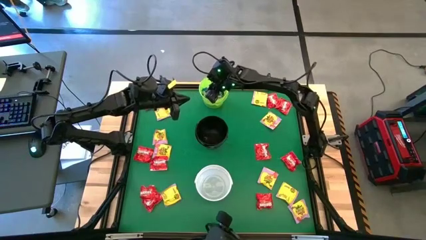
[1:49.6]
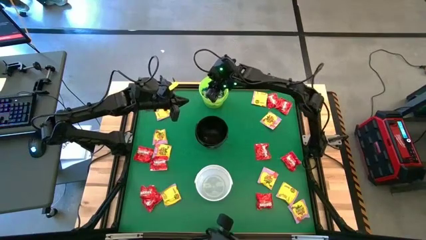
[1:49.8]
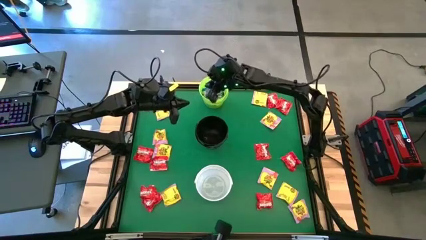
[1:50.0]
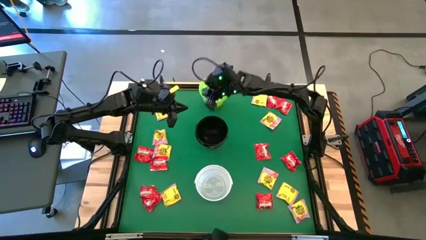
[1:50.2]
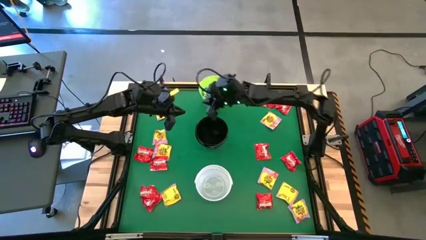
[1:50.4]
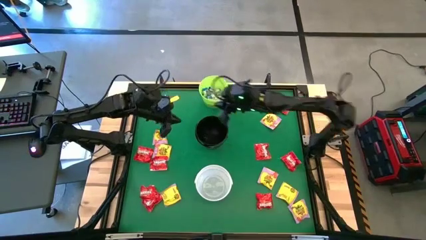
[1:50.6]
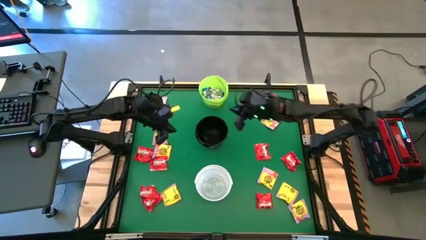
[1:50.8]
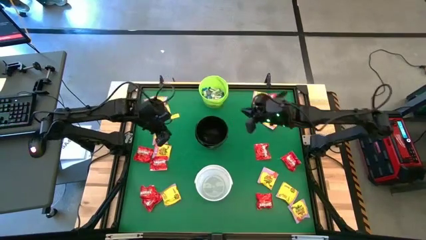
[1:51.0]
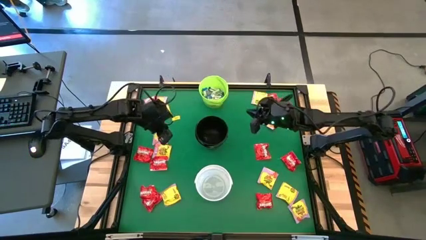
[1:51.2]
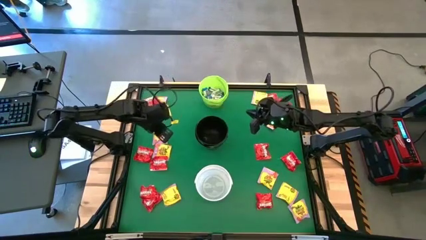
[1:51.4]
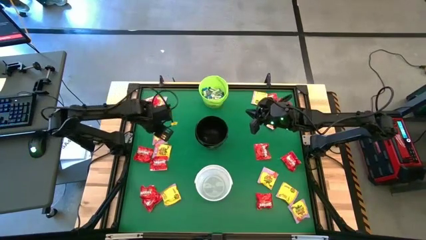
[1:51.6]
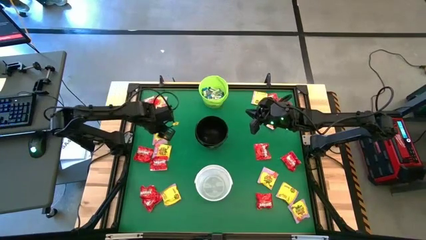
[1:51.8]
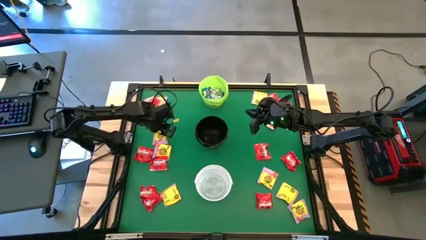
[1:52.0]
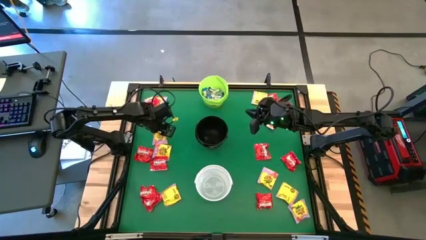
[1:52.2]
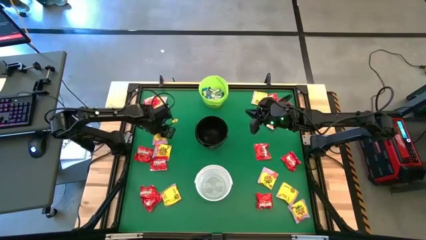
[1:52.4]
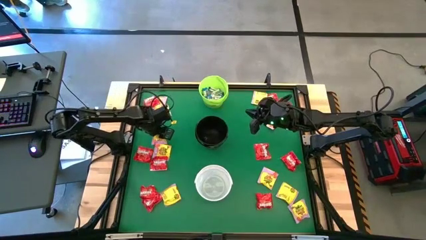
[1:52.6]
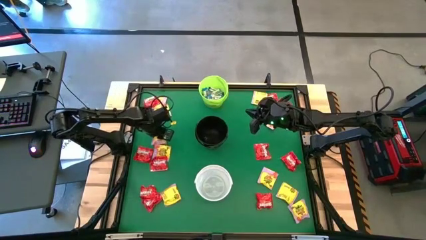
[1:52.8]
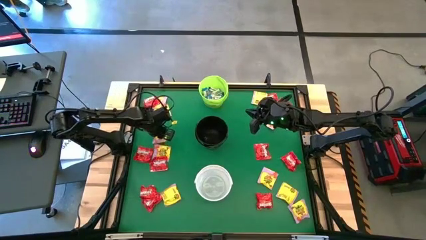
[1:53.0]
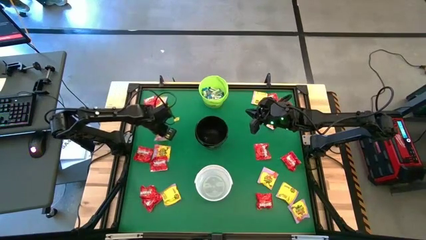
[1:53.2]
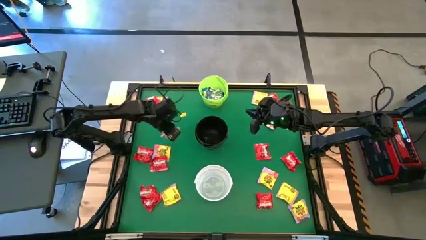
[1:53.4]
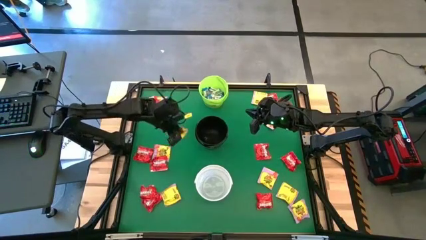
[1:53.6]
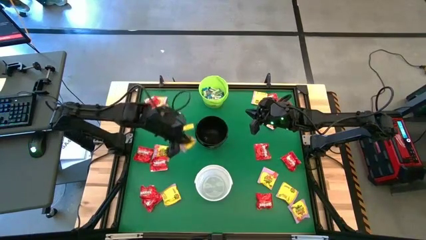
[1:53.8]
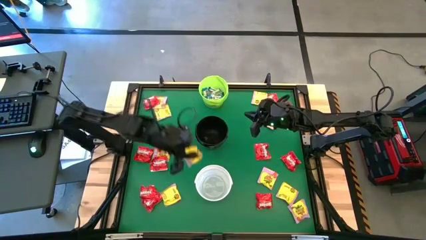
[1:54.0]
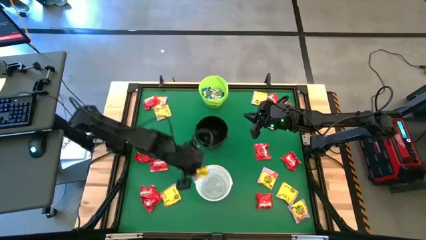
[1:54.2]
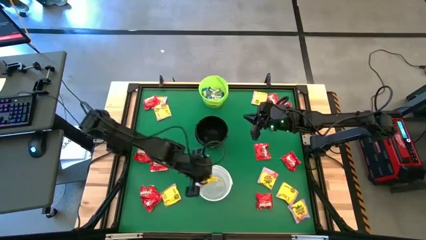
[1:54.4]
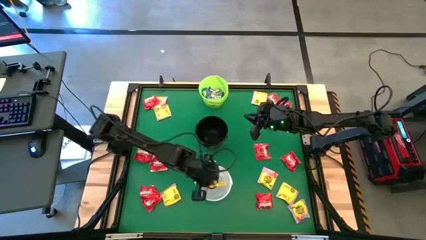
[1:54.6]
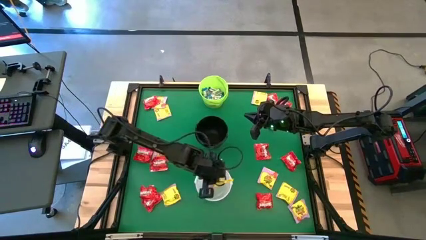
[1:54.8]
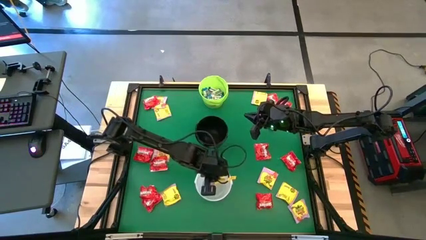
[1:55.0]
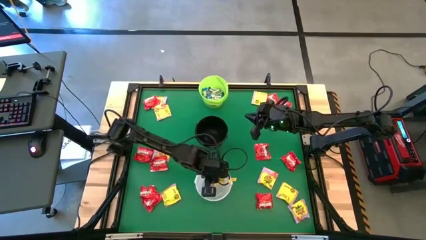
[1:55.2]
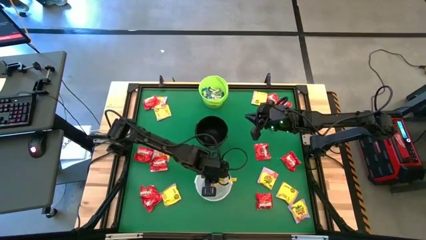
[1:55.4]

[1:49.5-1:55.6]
Task: Sort candy by brand, put in halloween buckets
Put the yellow chocolate into the white bucket

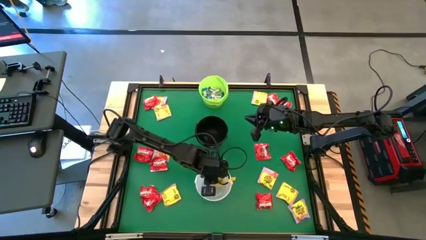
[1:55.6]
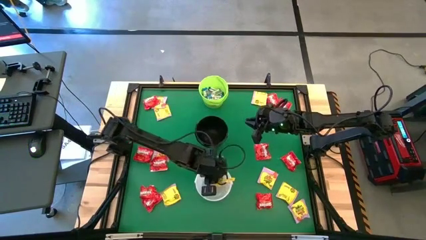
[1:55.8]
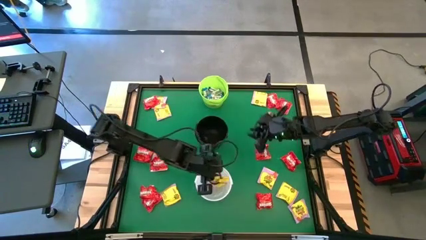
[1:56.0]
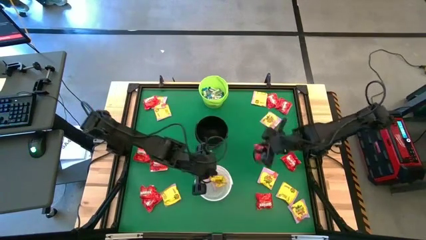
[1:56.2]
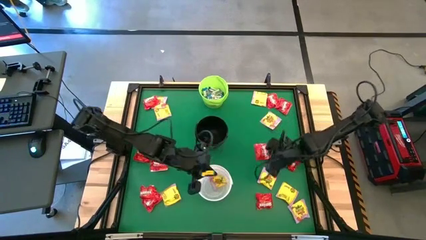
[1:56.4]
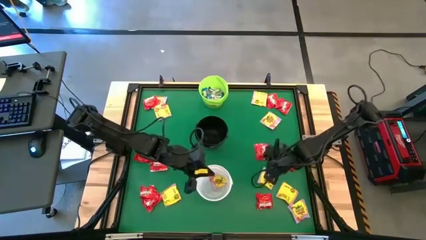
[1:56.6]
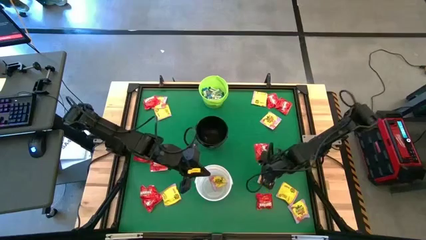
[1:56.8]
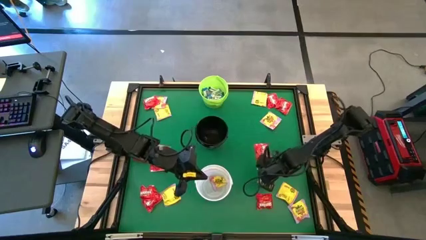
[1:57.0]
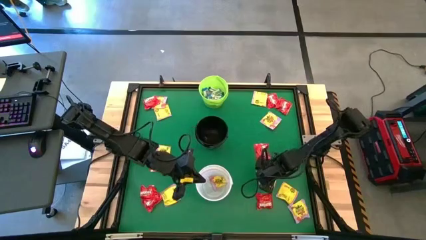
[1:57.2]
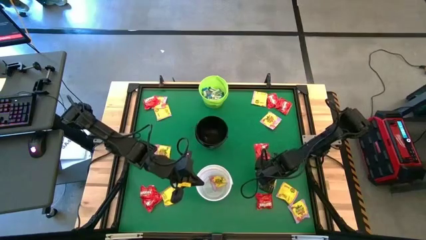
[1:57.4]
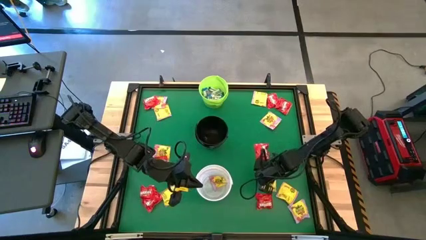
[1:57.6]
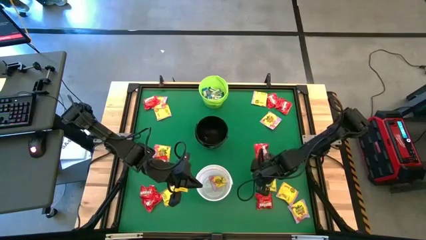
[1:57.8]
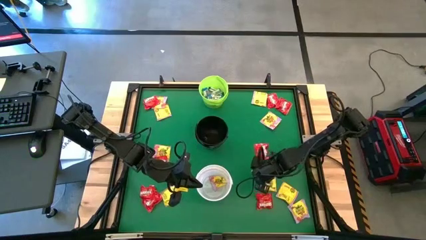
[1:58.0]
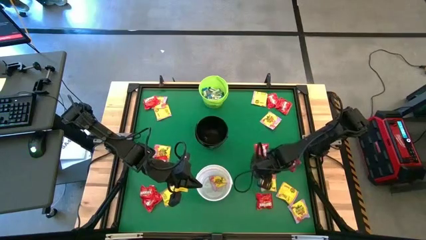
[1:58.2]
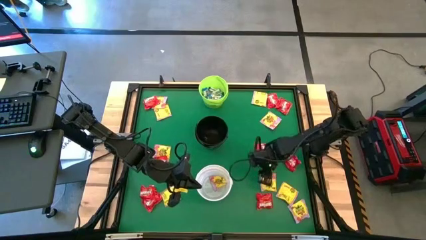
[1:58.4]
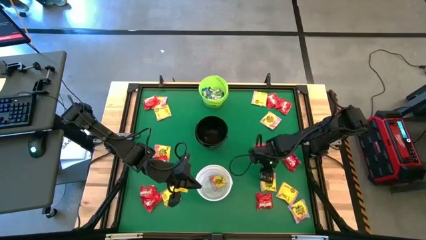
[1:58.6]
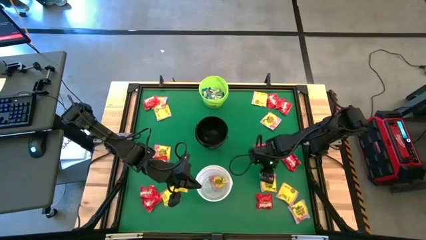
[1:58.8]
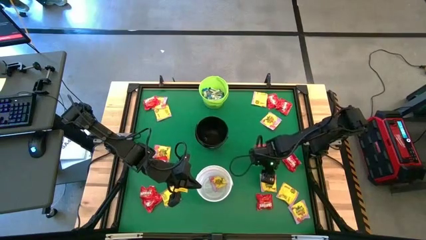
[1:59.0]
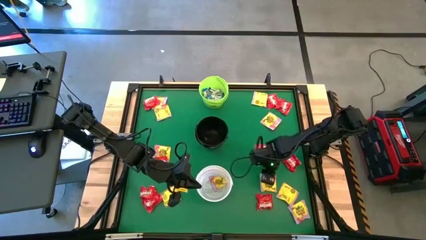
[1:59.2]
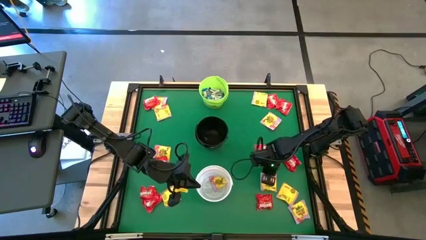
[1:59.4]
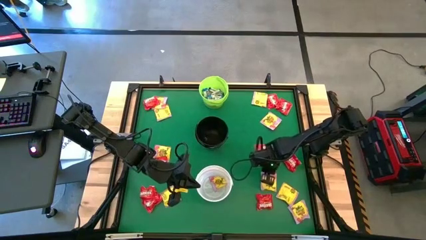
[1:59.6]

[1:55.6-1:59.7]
Put the yellow chocolate into the white bucket

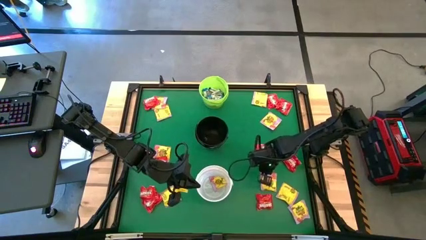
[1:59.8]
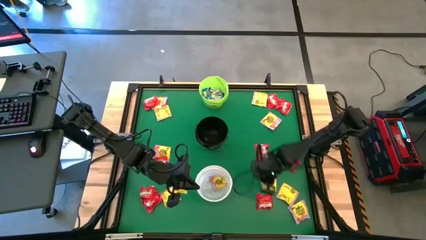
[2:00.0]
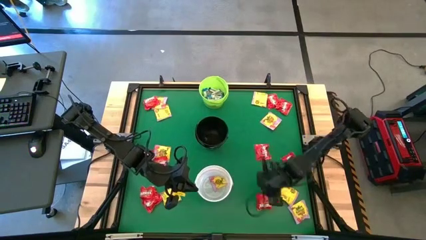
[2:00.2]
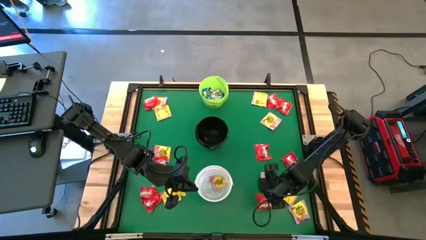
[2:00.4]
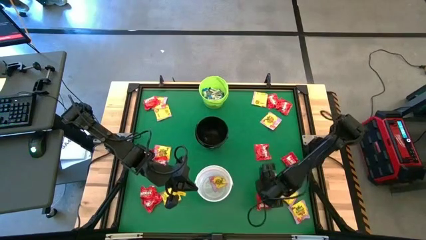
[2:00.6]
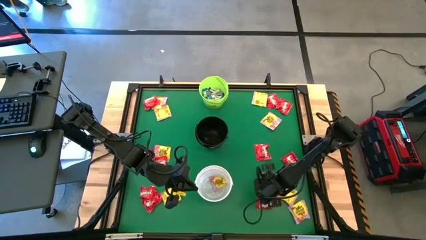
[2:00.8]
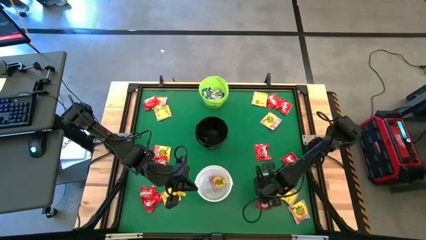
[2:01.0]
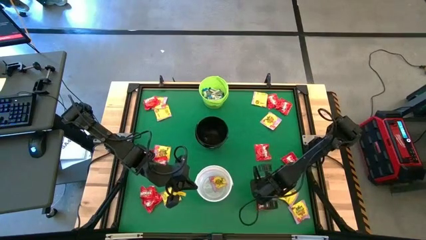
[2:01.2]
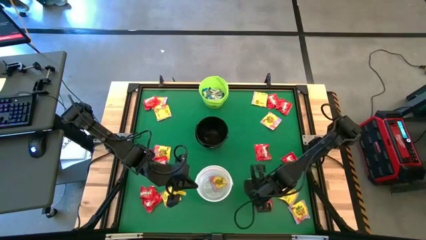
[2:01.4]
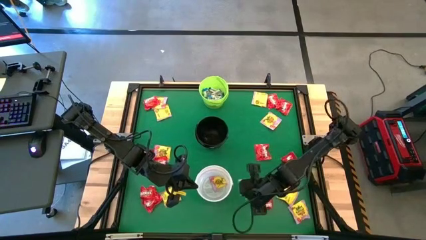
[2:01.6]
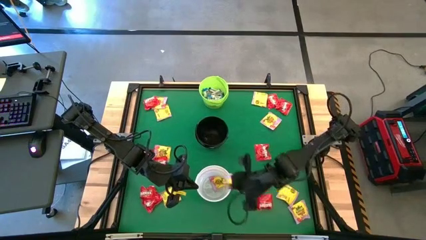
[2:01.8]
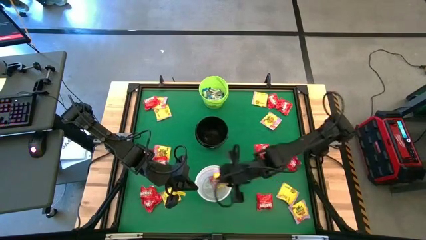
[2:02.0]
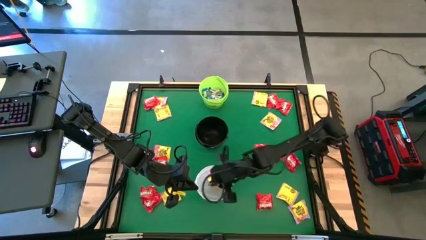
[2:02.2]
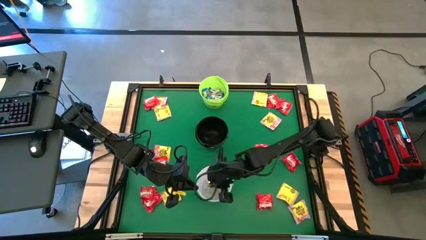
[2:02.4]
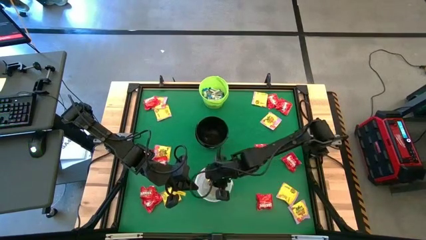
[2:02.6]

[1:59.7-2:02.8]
Put the yellow chocolate into the white bucket

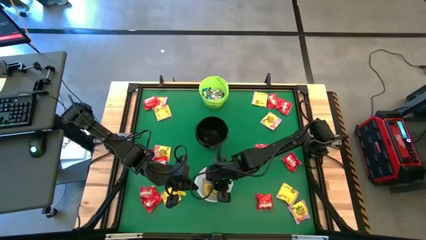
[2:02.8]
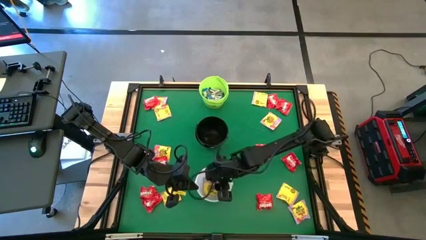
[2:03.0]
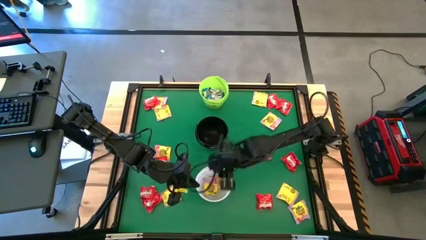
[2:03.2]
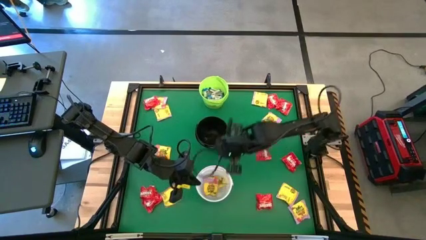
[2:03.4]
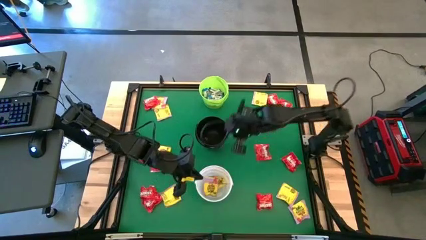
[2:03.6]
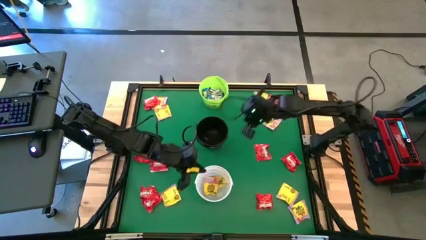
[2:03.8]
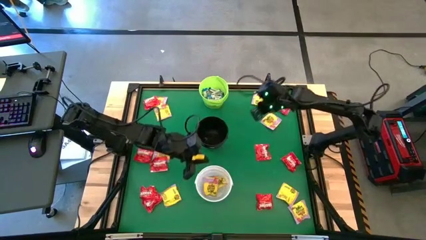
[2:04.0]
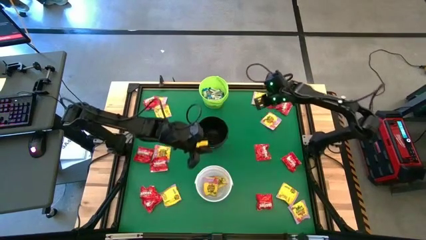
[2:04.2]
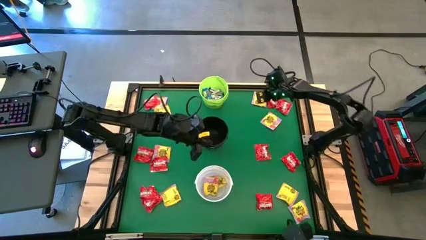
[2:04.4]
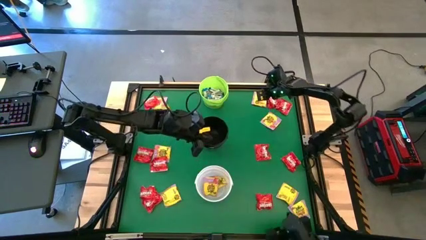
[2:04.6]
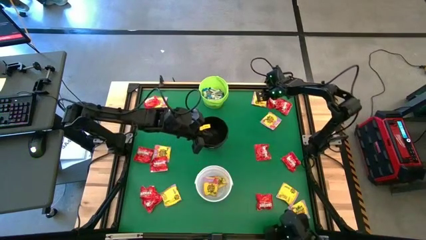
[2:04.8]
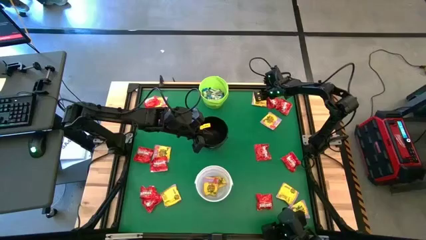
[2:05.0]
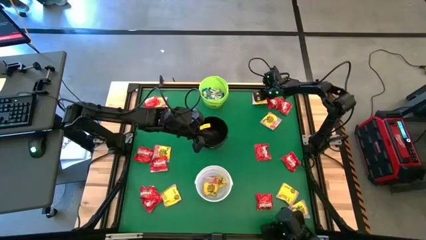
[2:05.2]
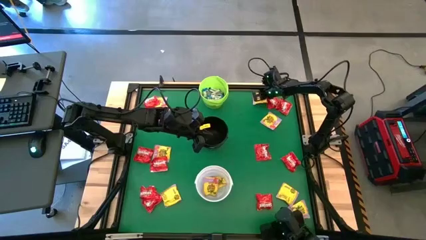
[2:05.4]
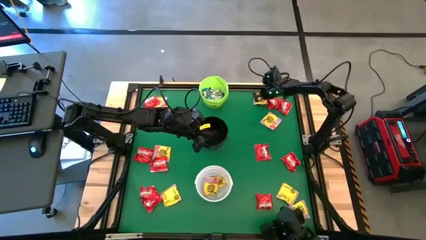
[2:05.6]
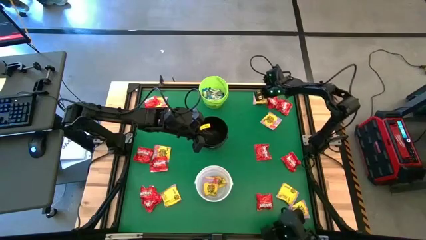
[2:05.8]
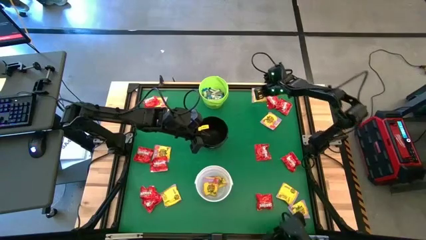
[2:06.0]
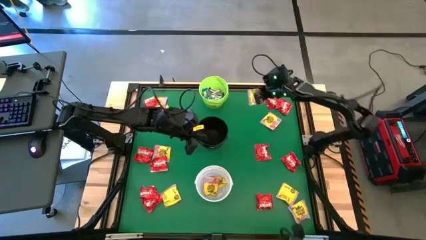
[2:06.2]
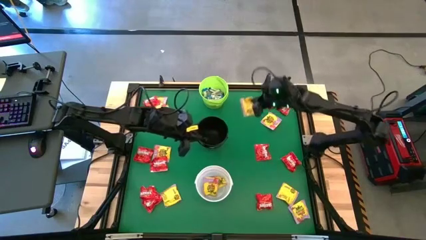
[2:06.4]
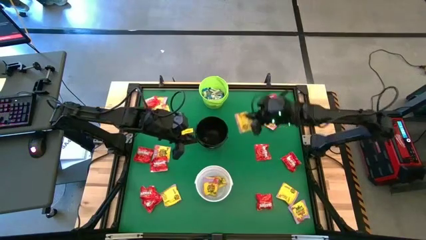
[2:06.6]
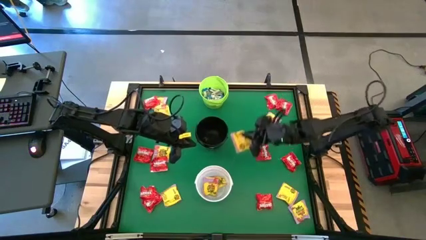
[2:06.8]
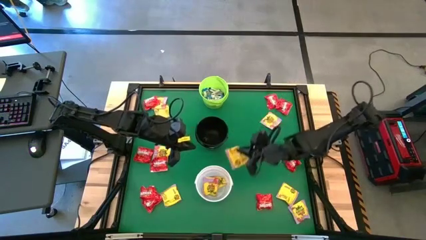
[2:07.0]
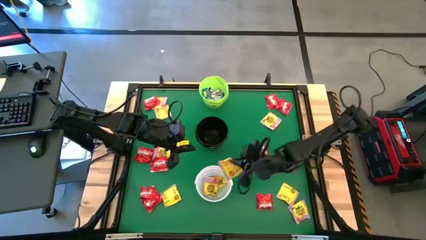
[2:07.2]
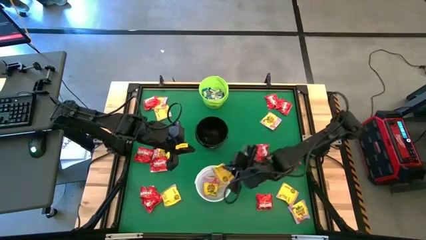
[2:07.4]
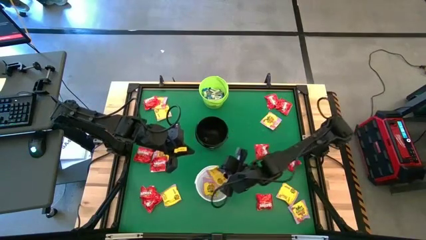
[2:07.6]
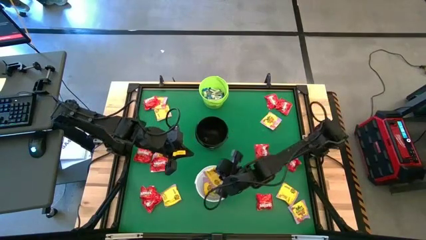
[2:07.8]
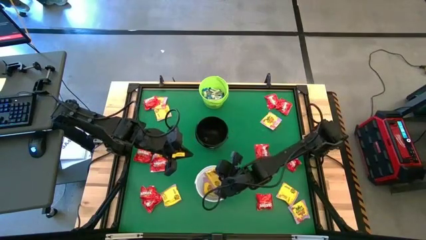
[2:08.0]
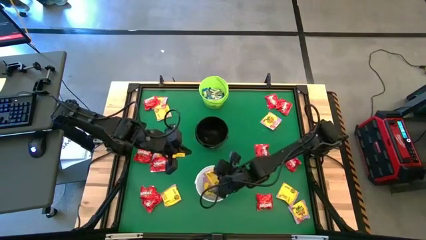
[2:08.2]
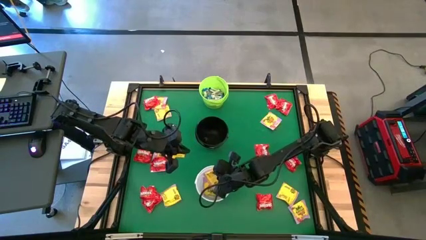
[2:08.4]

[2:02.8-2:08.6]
Put the yellow chocolate into the white bucket
